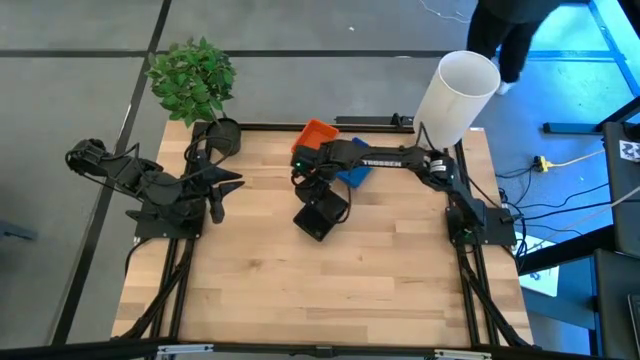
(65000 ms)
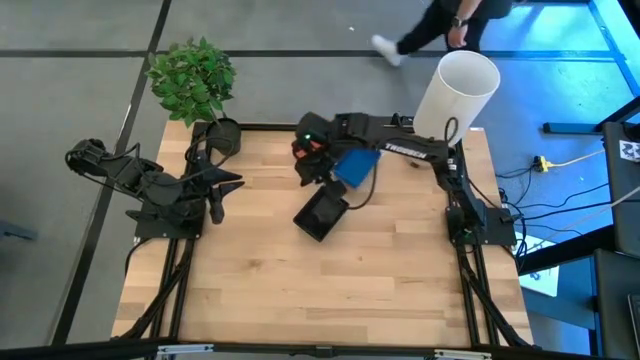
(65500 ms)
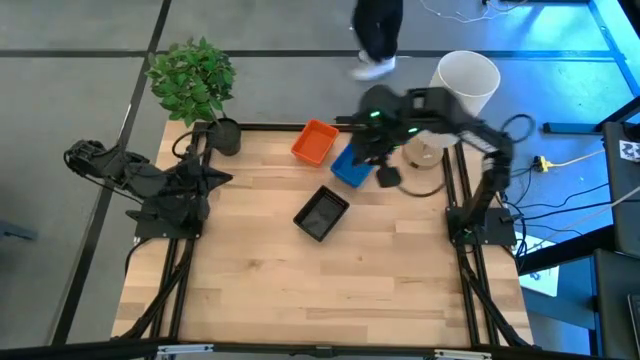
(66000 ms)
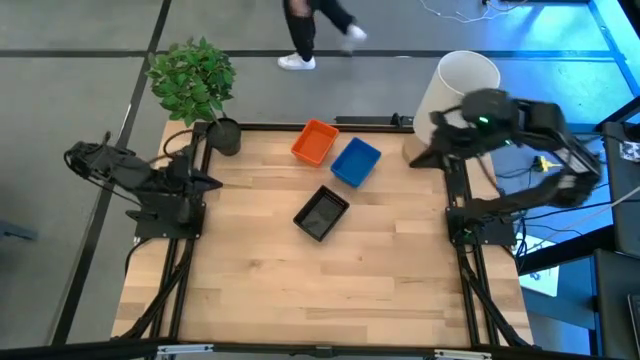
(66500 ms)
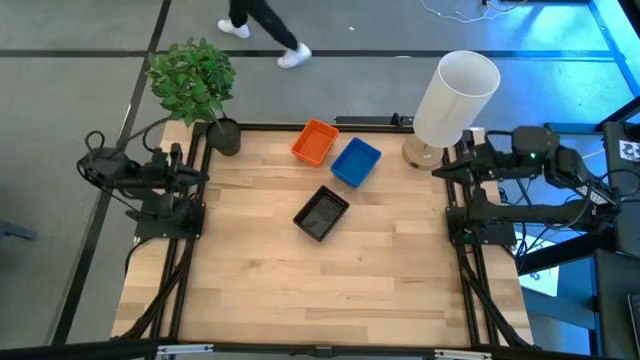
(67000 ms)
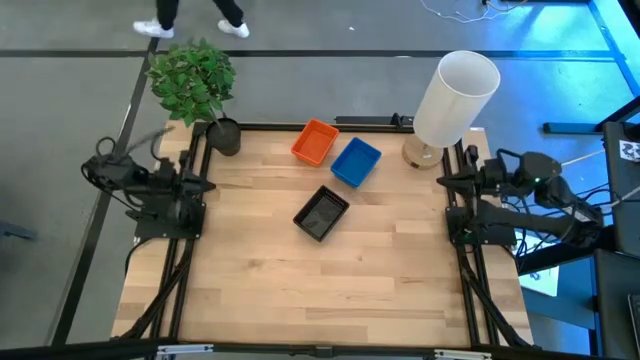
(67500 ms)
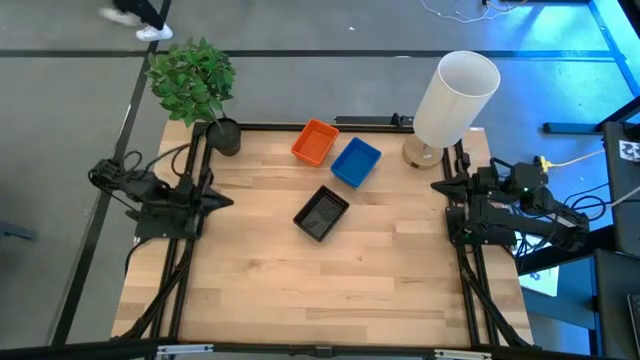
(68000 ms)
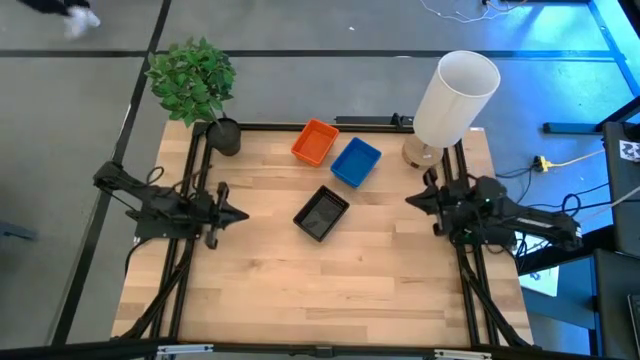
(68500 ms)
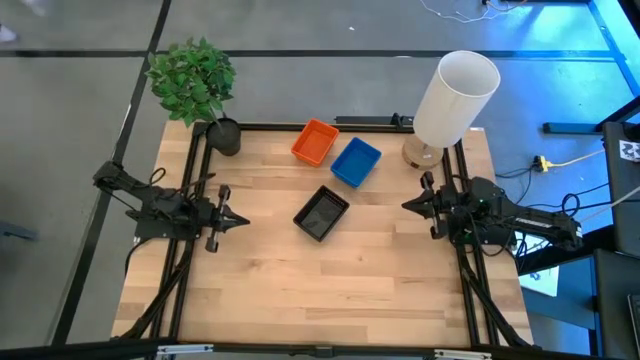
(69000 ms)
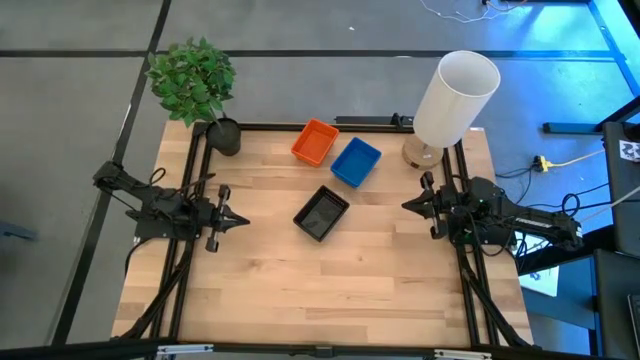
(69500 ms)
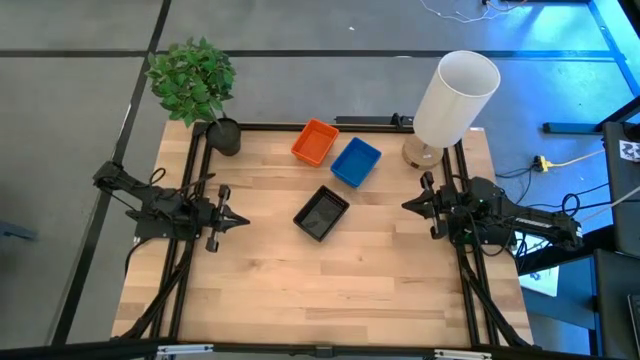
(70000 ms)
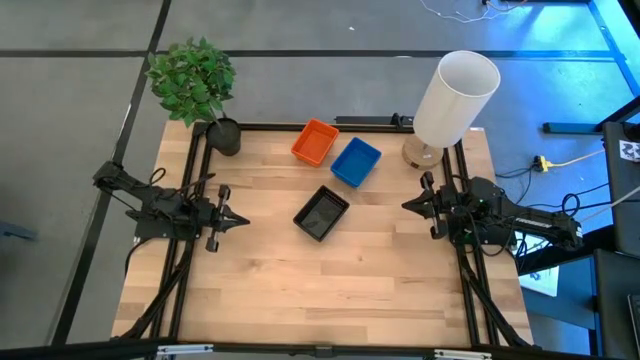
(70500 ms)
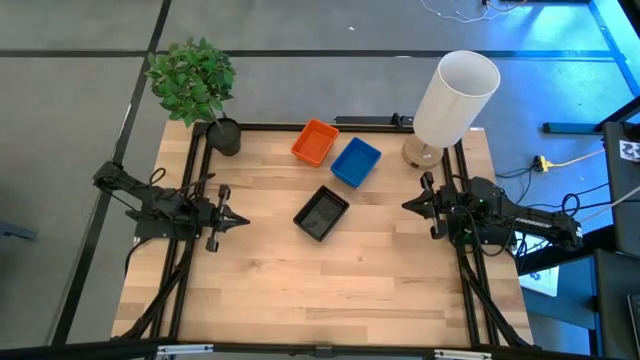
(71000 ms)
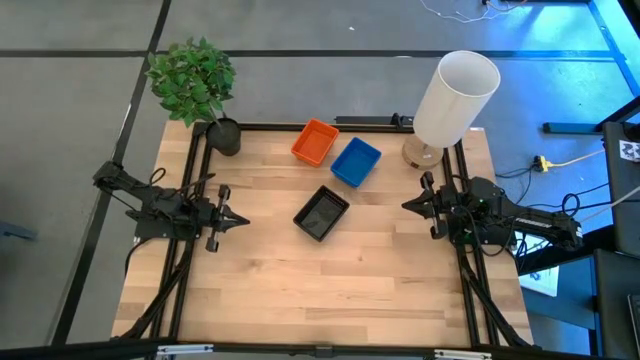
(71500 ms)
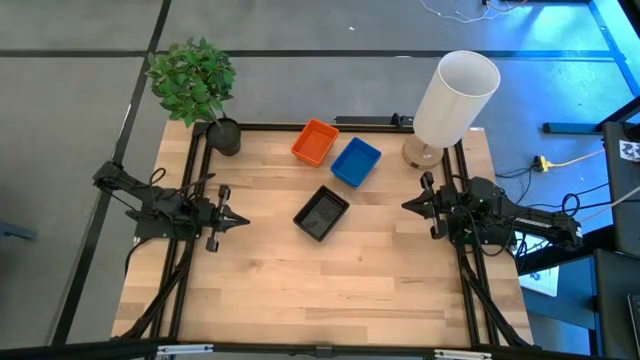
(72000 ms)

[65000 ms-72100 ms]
Return to Home Position
